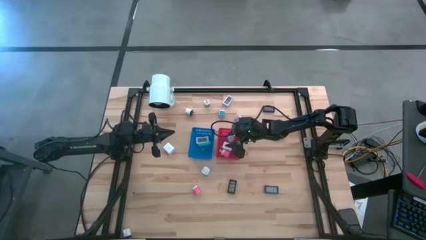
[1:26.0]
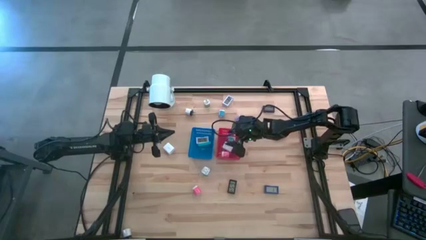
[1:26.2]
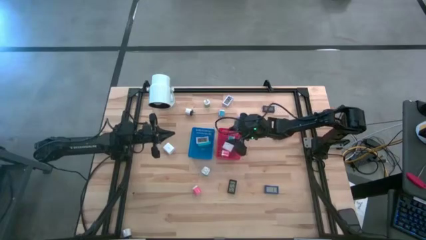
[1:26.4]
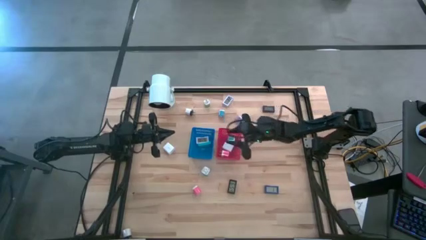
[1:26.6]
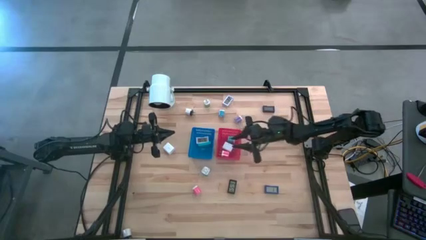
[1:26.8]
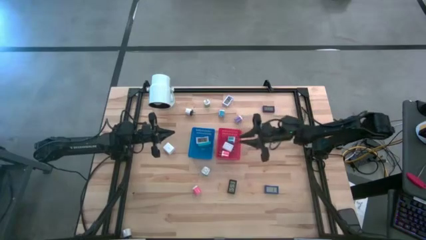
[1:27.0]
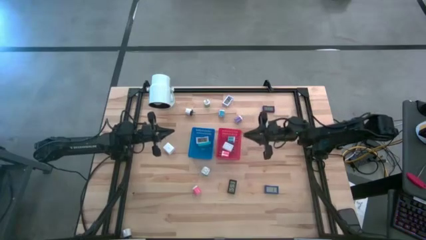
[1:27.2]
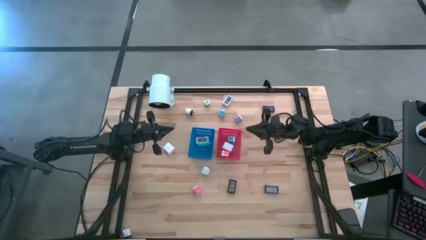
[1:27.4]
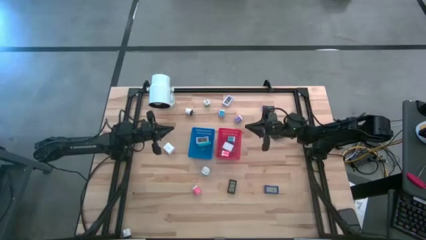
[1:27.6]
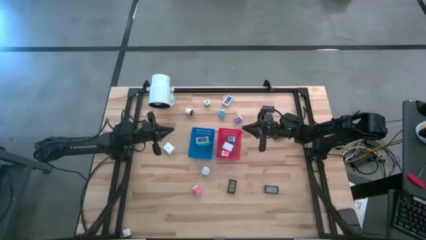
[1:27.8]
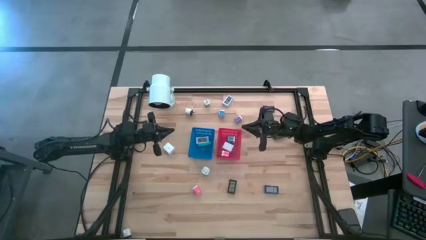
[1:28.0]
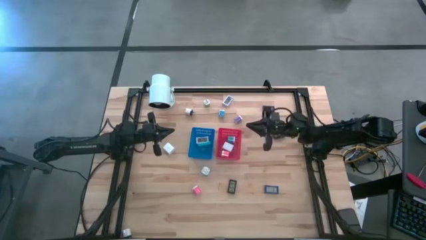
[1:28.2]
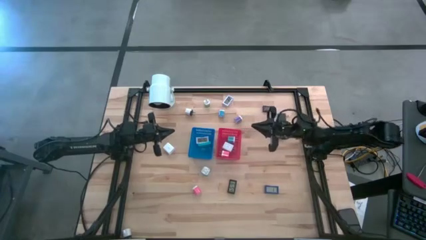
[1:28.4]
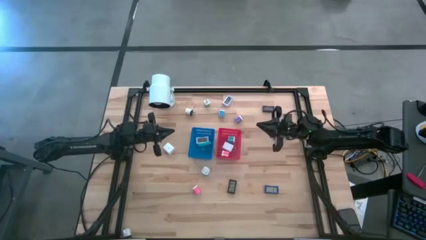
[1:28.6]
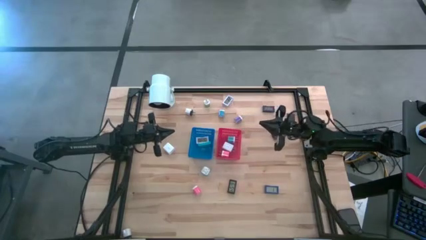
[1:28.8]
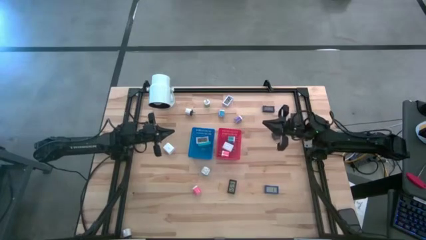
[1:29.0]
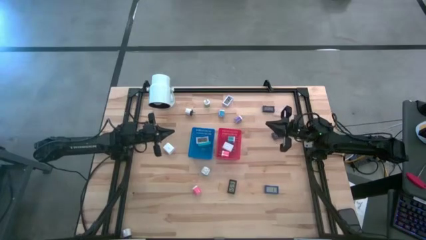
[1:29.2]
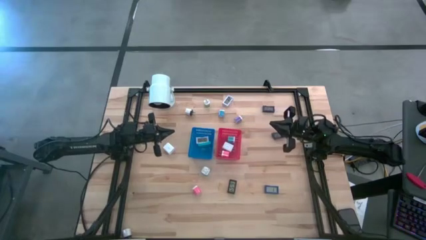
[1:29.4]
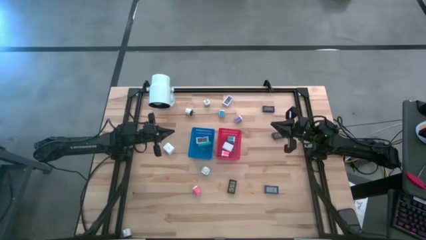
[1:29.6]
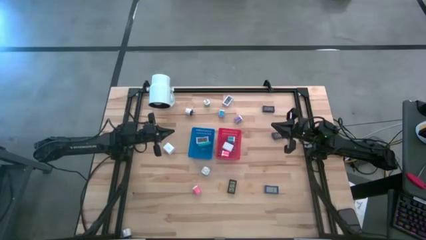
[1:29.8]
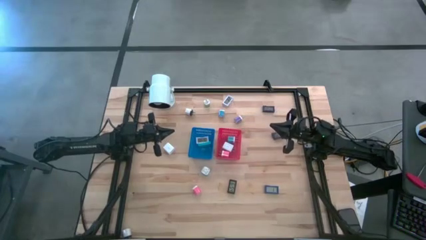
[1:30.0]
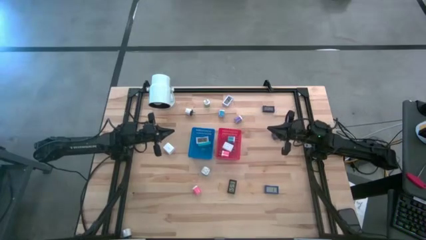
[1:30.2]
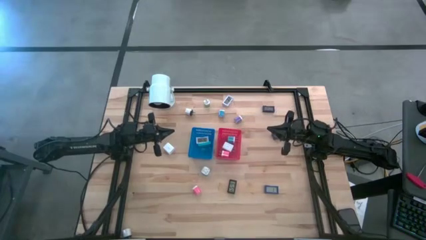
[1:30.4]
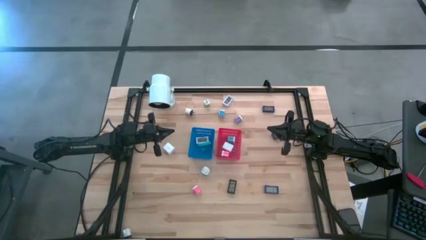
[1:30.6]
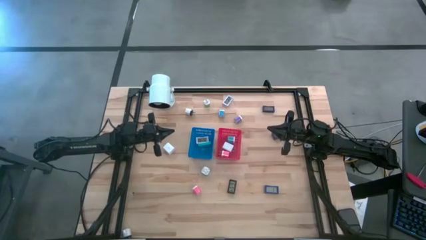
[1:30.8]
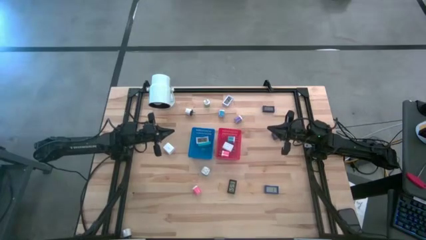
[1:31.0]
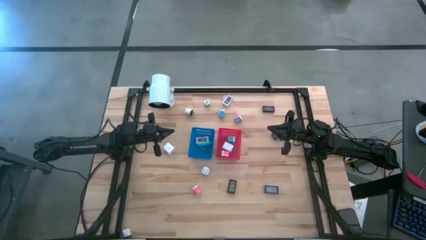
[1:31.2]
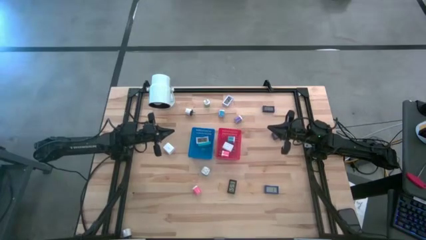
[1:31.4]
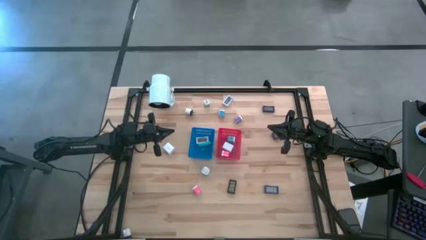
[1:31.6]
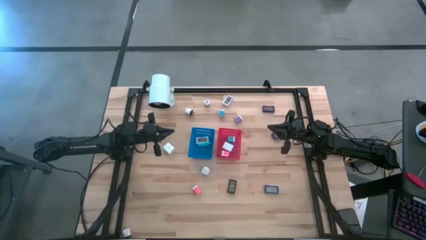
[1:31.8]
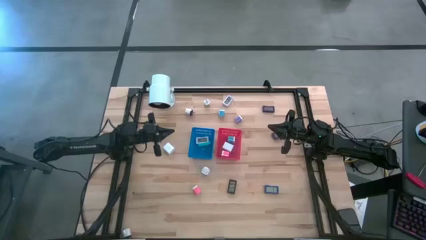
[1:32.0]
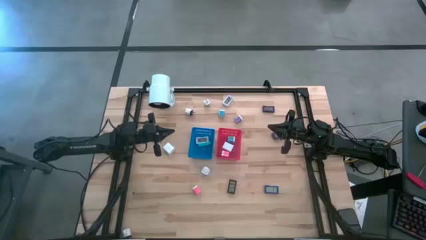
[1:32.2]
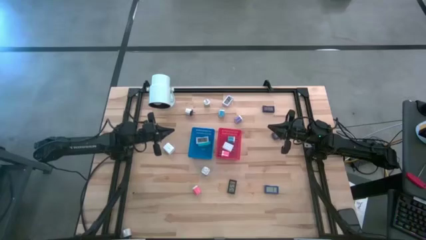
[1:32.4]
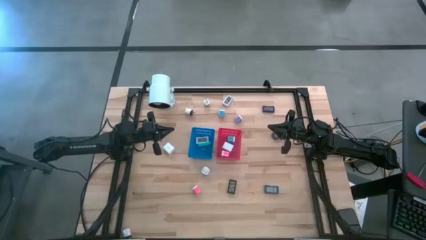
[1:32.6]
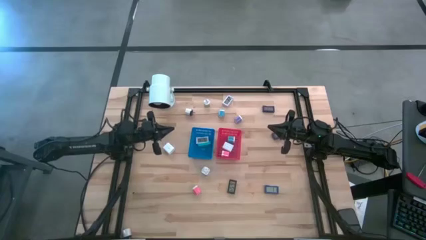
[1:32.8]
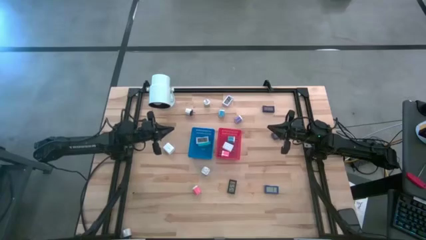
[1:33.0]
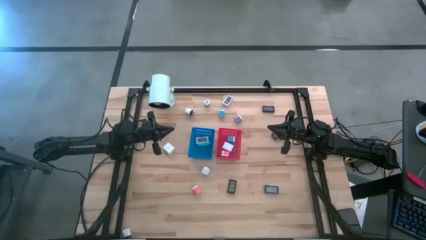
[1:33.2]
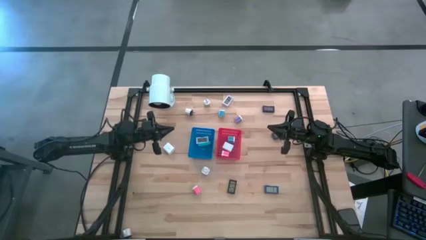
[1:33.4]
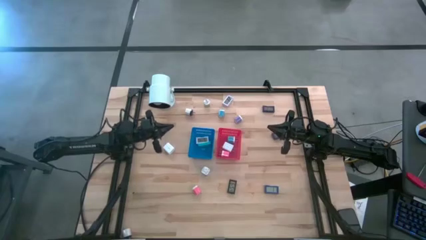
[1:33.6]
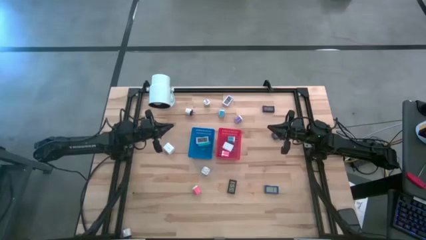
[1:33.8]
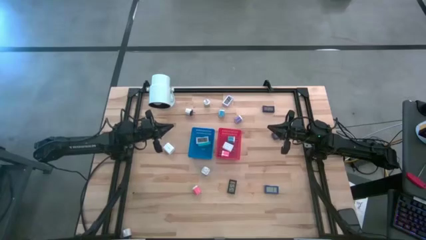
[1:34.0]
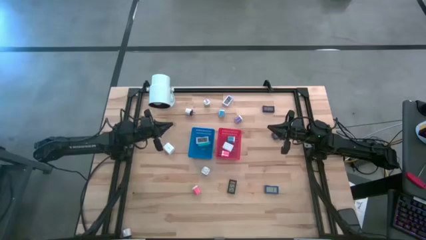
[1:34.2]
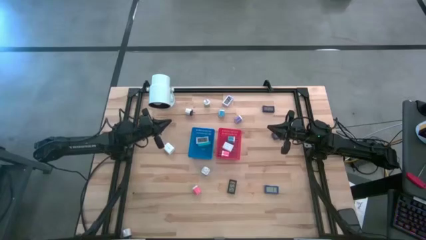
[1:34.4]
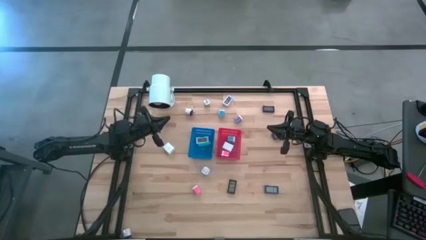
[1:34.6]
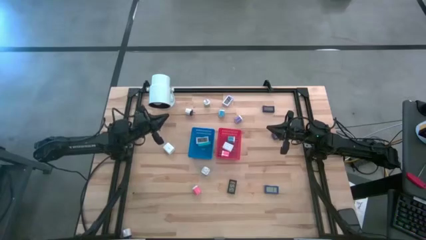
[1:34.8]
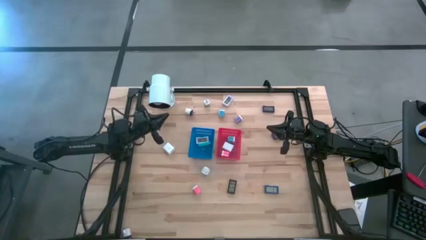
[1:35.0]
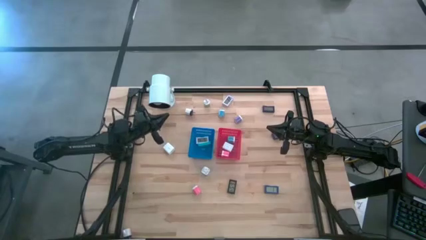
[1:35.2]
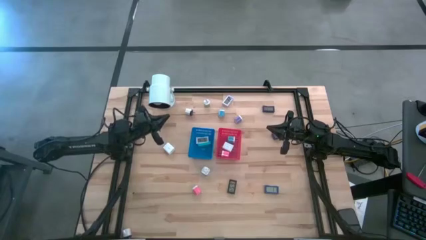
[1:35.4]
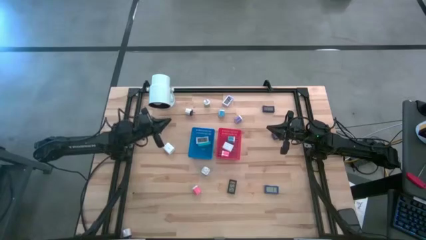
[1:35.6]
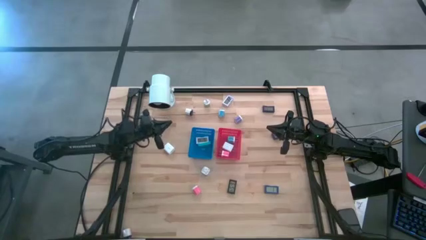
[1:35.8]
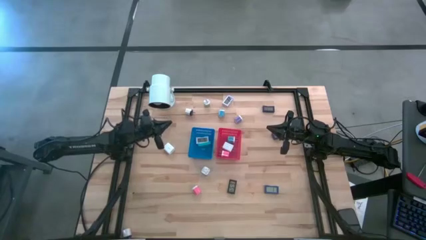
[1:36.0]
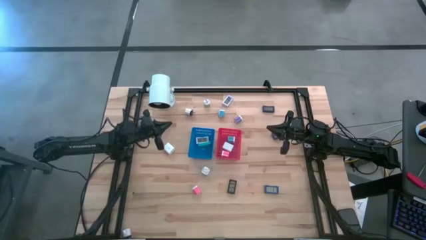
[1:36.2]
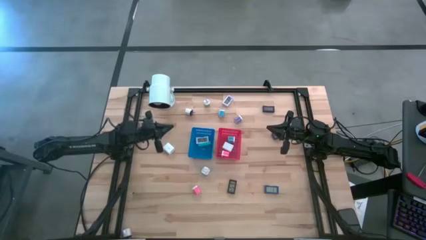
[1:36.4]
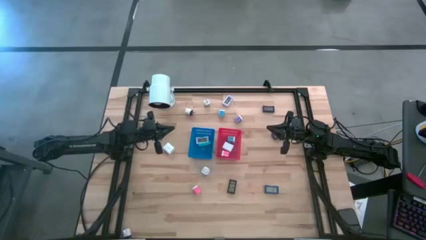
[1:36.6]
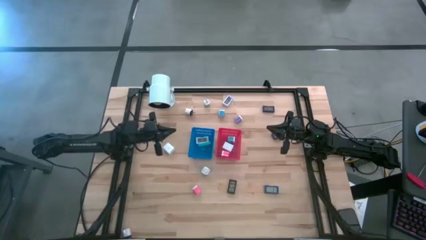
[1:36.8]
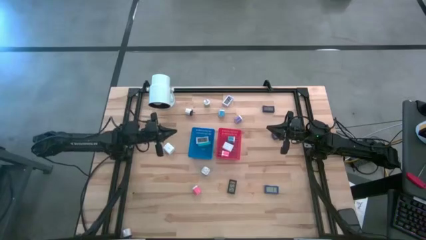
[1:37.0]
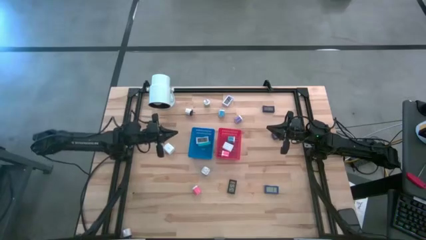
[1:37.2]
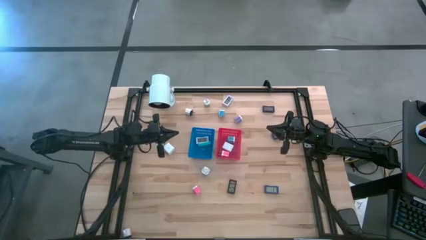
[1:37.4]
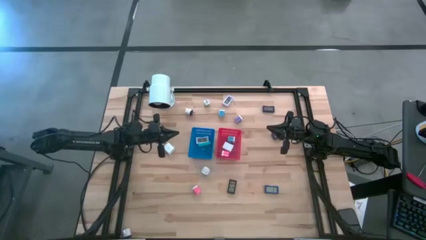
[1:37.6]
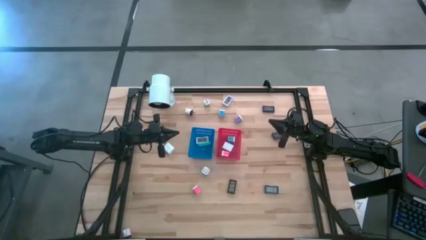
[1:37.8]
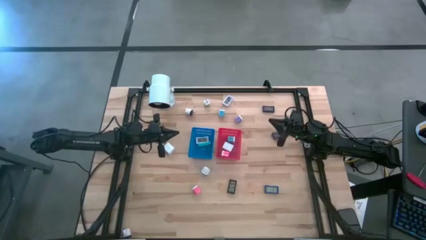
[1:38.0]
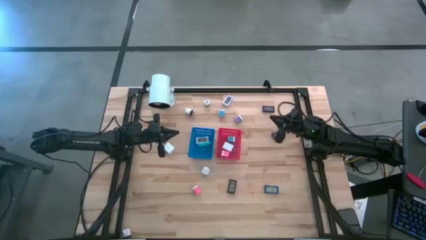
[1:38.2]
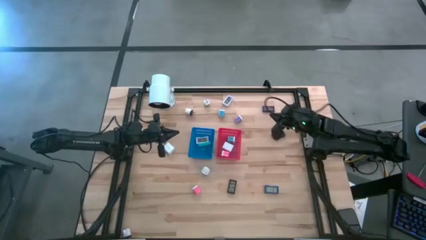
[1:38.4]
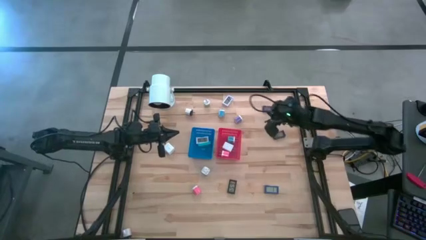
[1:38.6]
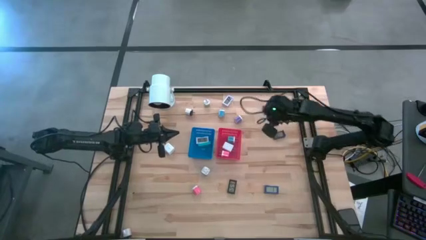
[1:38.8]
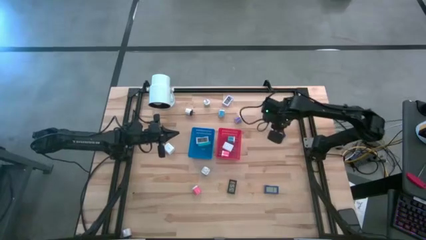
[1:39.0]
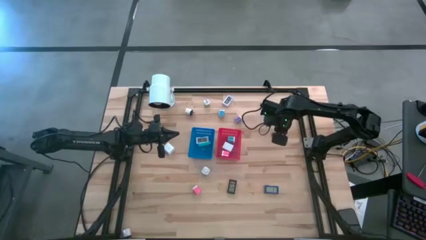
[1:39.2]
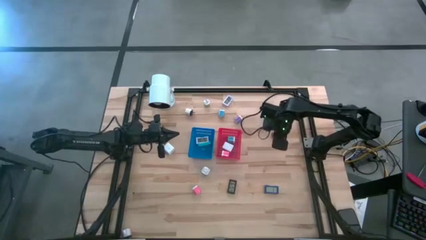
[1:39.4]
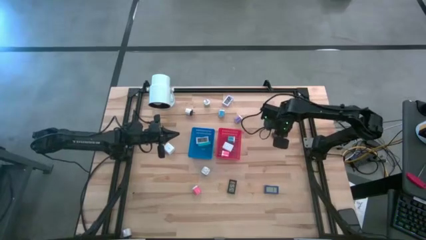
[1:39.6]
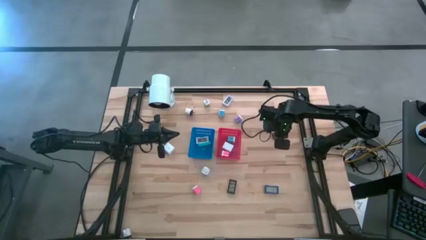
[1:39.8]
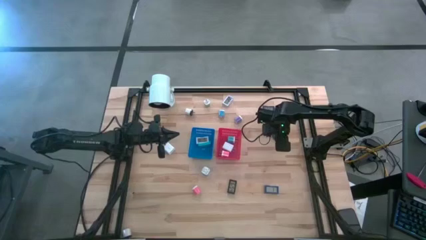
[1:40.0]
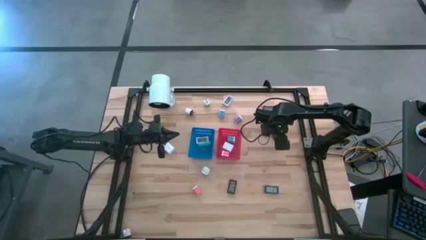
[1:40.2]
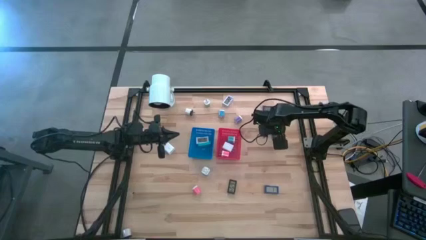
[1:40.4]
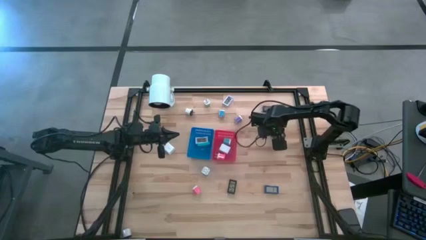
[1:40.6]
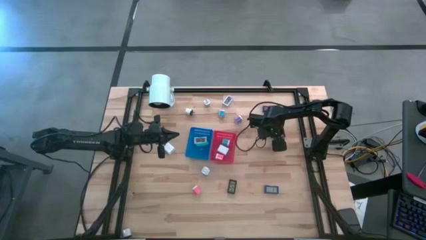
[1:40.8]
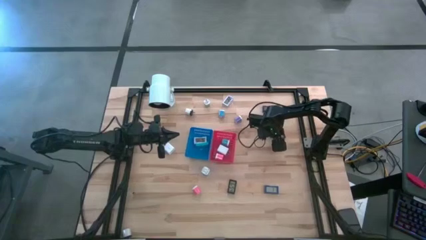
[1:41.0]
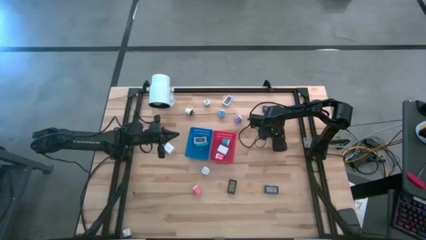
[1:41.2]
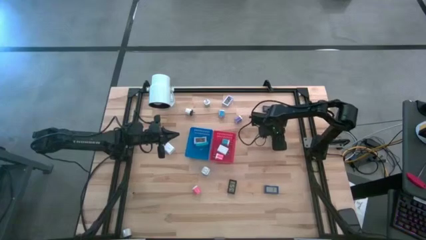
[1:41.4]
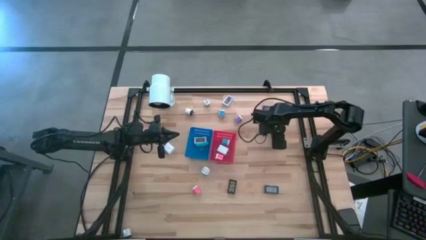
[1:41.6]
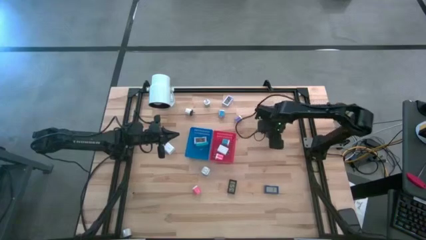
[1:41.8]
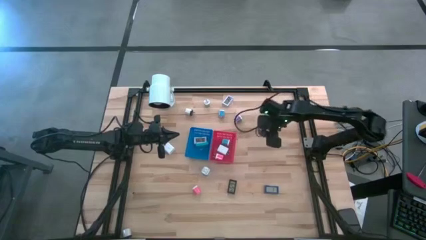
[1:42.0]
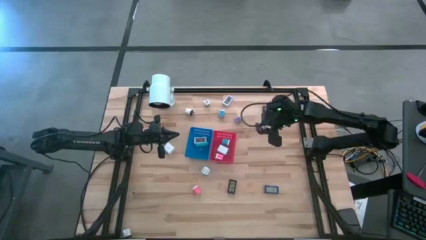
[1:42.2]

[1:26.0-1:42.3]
Task: Pick & Place Office items
Put the dark blue digital clock into the blue bin
